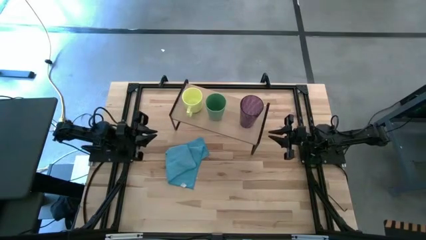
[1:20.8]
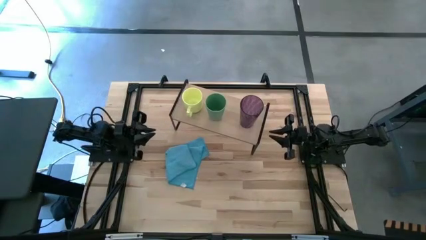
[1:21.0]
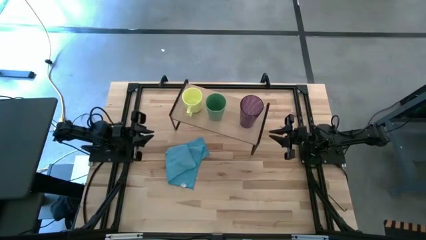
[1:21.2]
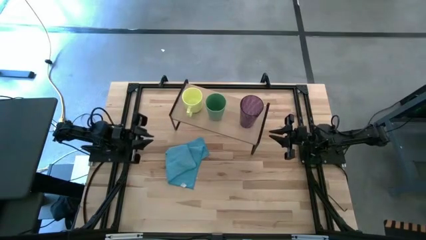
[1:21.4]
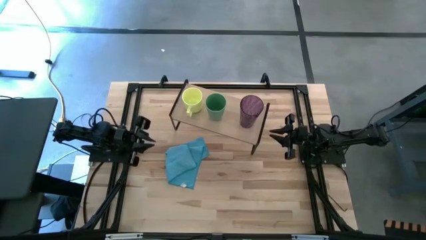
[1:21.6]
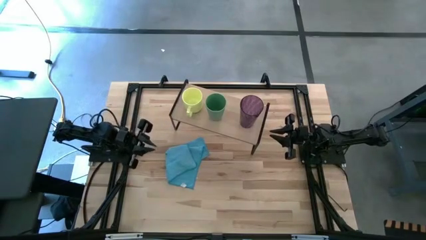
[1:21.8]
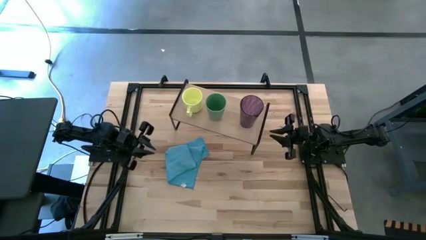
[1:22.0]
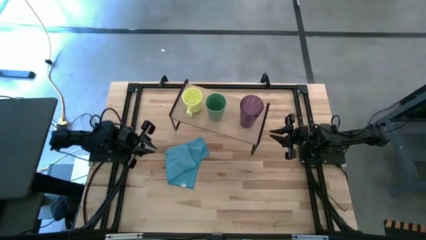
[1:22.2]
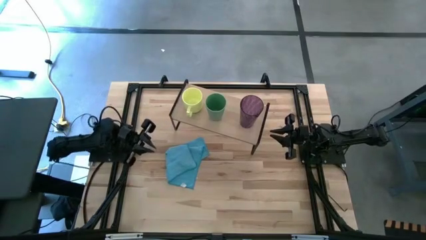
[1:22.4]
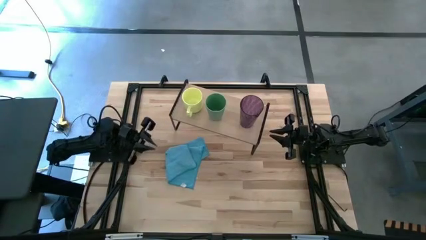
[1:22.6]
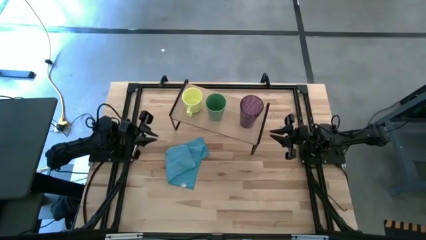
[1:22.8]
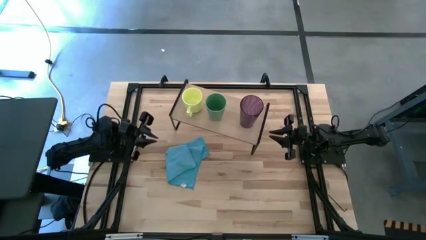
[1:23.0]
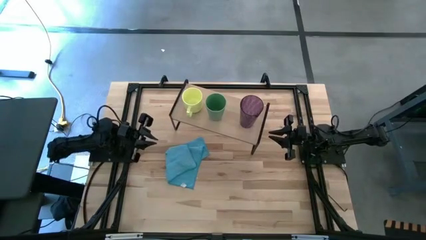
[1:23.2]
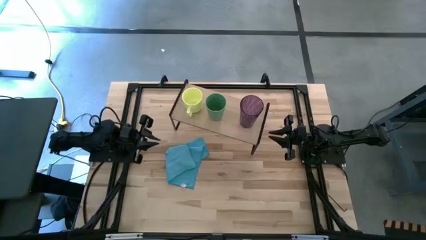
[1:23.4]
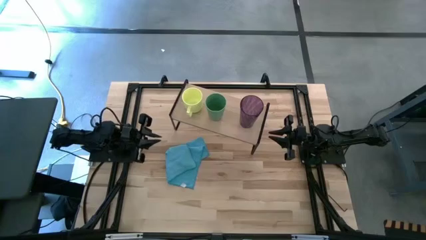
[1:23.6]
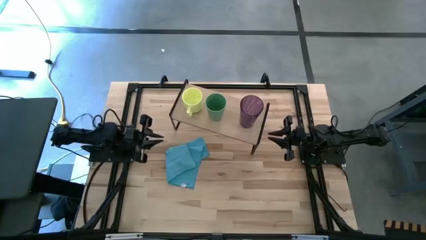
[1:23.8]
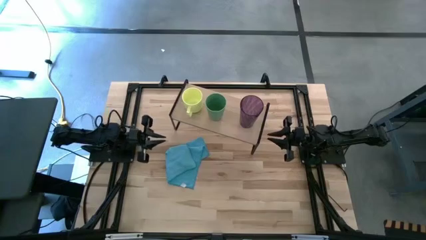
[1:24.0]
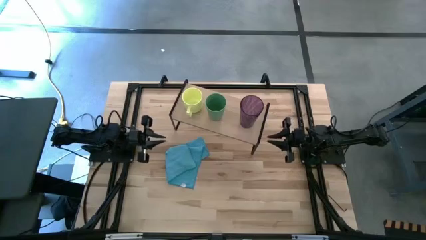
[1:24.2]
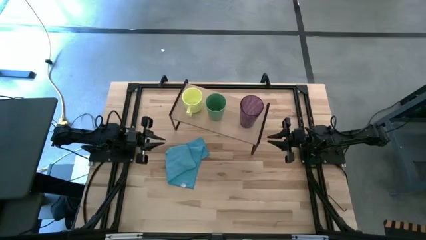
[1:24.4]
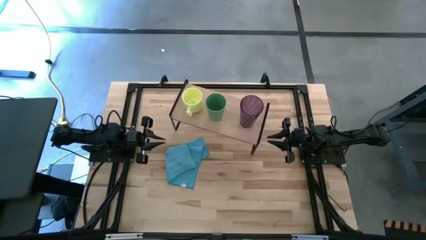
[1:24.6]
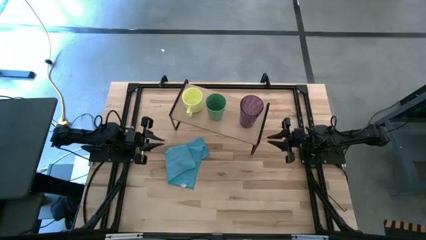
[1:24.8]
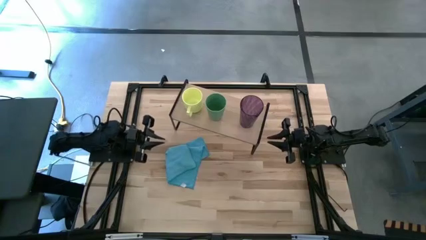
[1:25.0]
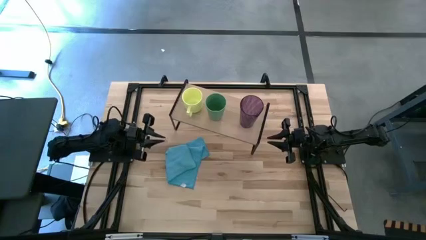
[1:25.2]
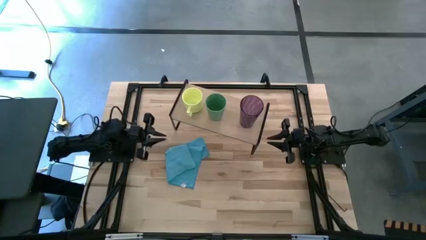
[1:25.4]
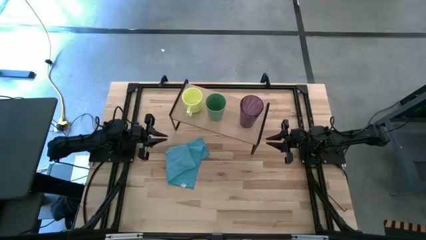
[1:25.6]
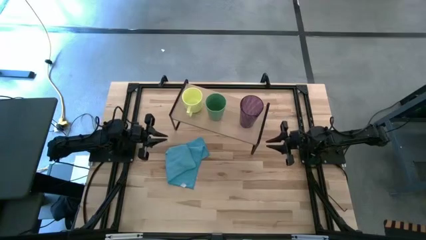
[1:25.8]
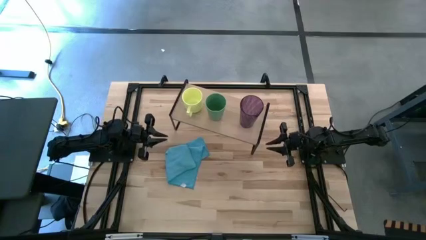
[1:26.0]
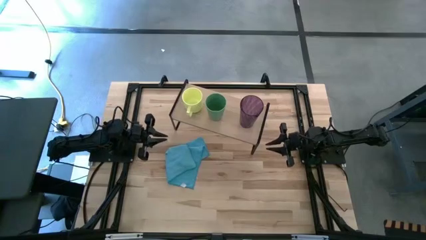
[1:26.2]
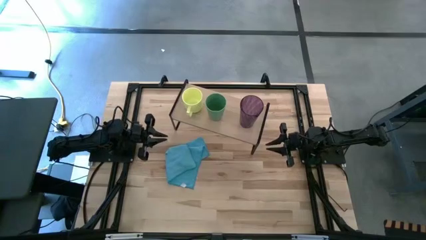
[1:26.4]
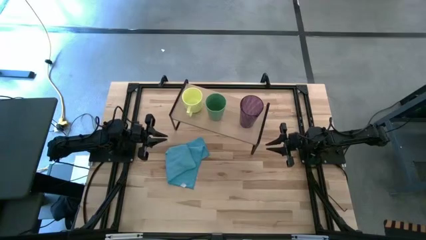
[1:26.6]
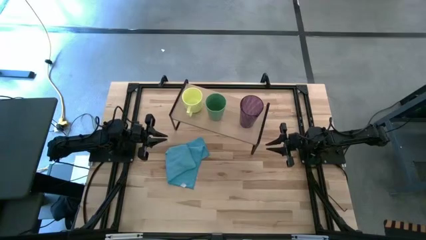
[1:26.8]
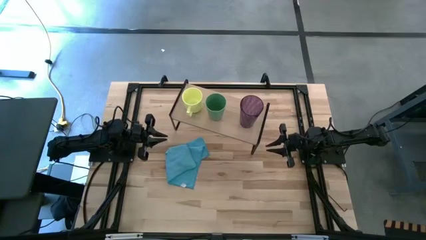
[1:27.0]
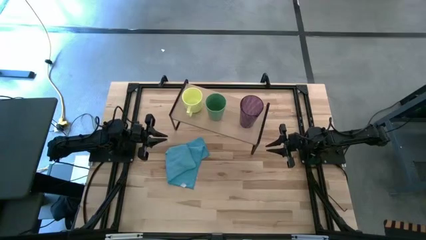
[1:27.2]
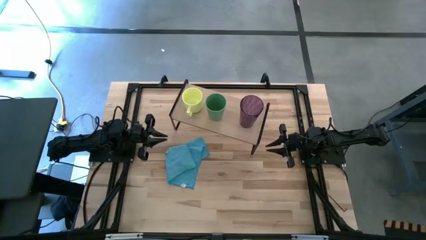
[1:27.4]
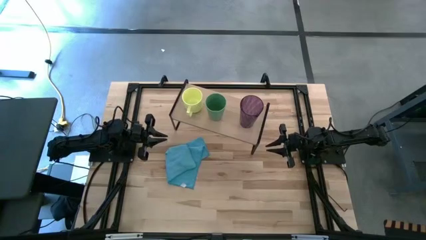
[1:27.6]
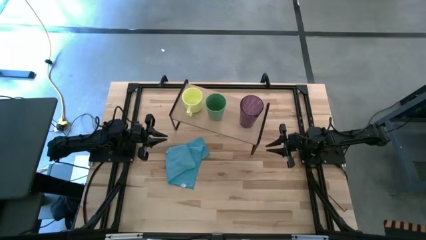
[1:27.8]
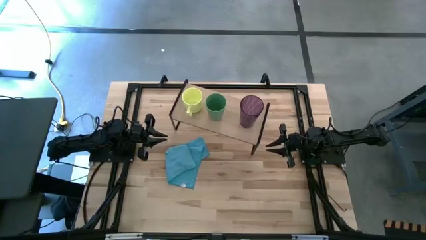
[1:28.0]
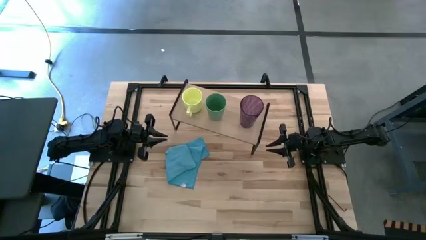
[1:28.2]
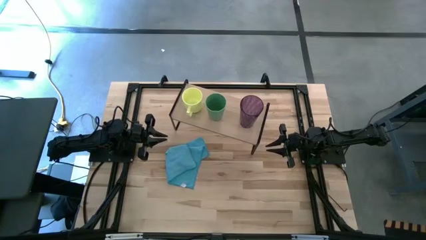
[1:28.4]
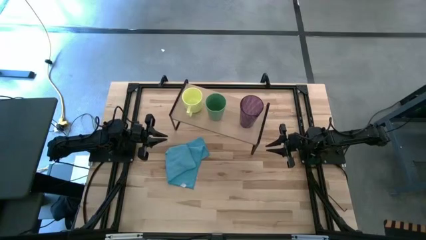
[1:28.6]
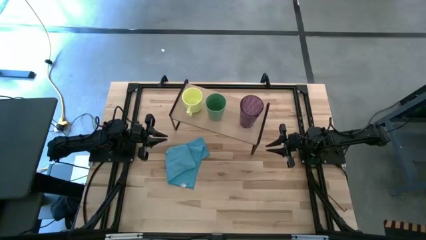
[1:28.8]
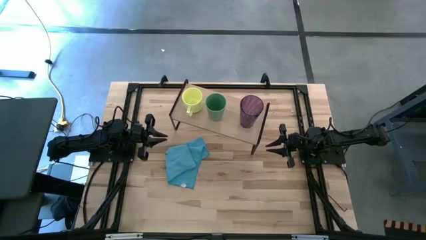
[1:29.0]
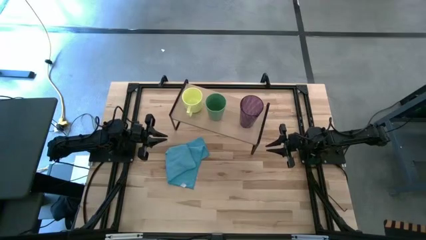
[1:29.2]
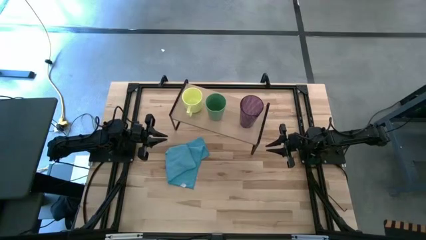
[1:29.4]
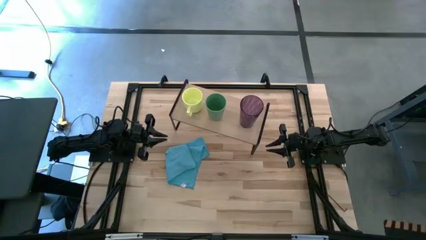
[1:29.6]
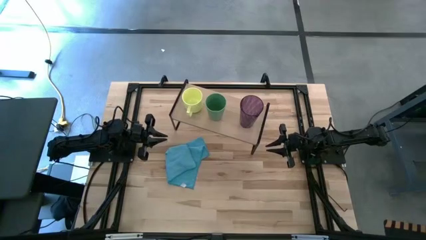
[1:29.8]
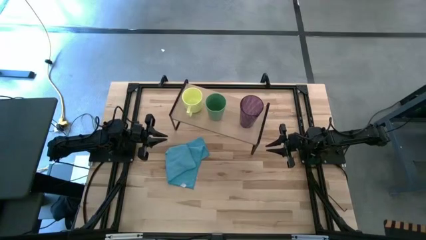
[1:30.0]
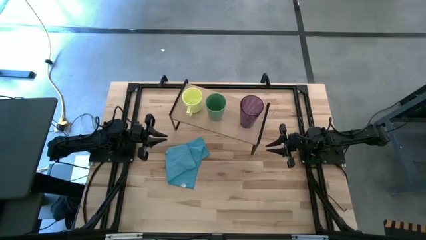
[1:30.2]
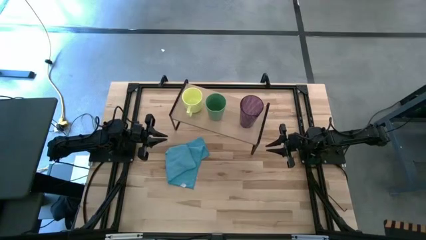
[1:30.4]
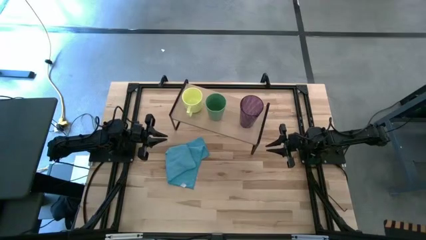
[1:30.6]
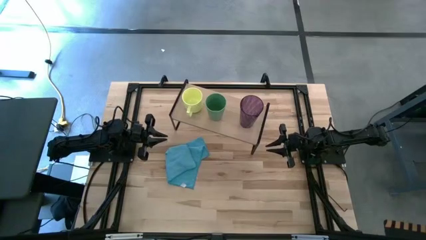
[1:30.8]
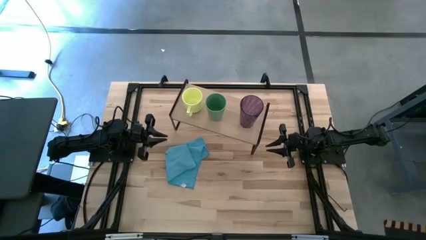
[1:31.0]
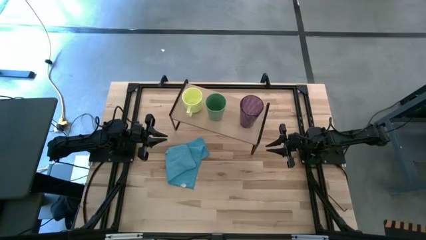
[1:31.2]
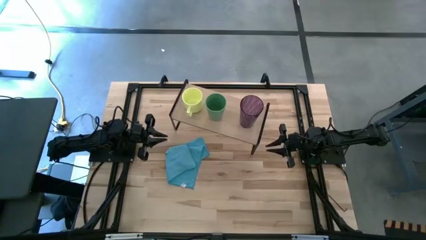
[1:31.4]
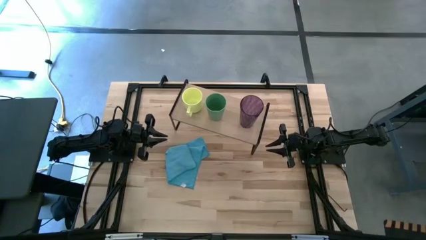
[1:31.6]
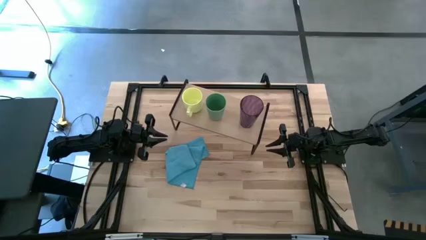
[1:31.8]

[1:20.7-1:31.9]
Task: Stack small to large cups/mugs on shelf
Return to Home Position
